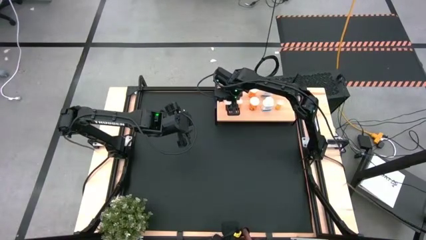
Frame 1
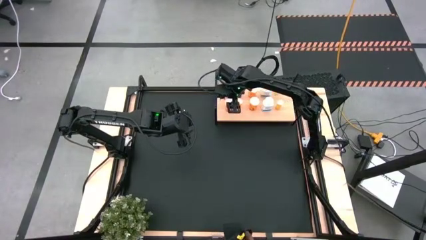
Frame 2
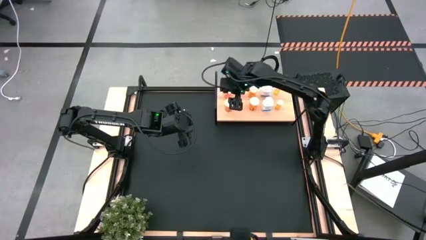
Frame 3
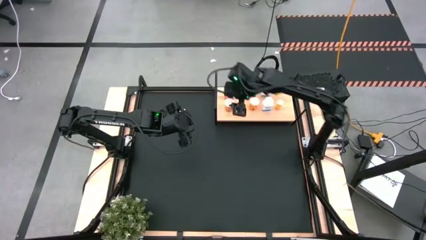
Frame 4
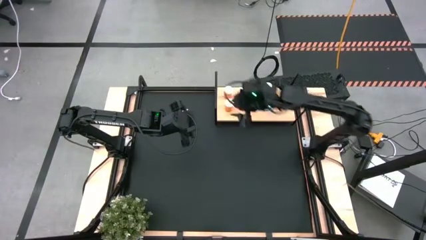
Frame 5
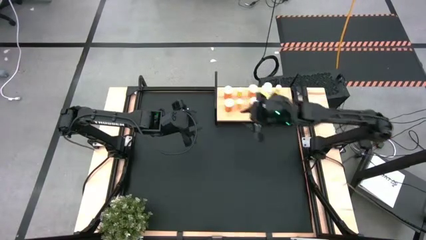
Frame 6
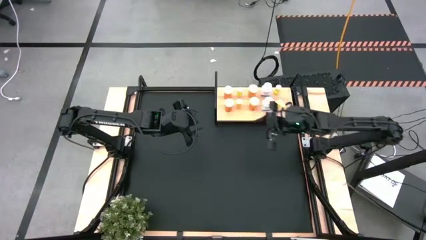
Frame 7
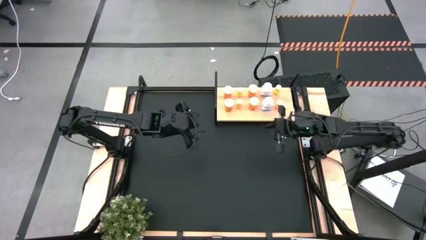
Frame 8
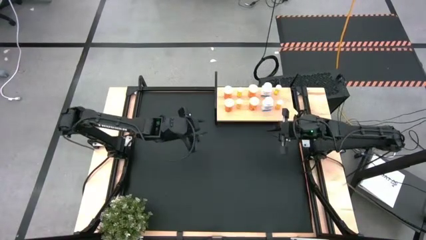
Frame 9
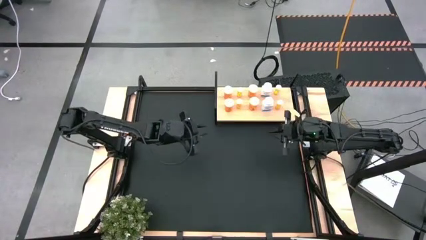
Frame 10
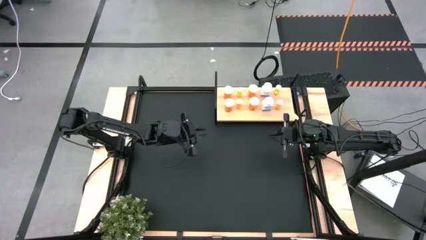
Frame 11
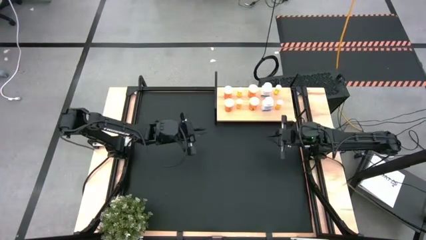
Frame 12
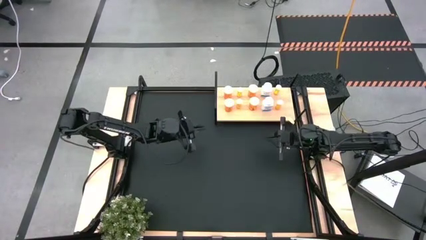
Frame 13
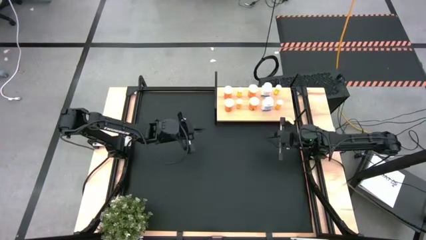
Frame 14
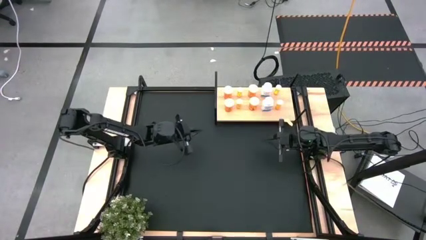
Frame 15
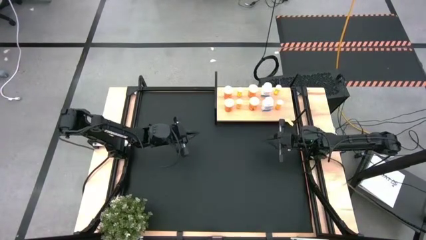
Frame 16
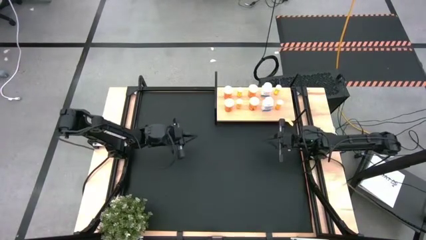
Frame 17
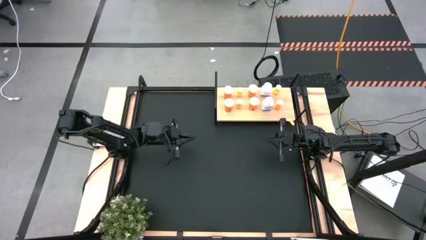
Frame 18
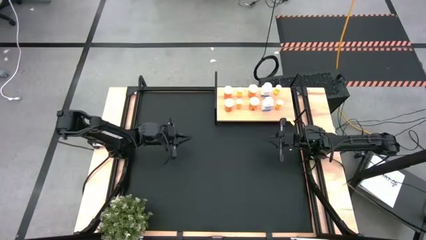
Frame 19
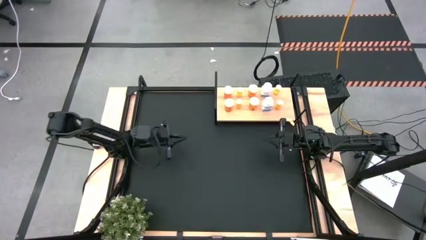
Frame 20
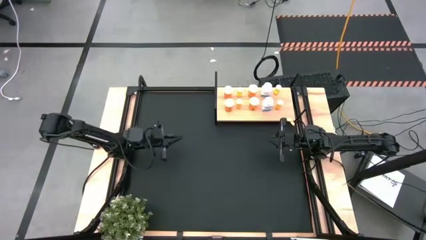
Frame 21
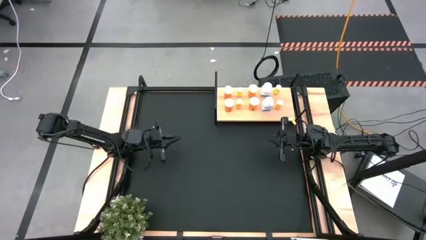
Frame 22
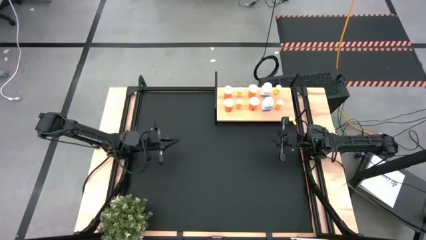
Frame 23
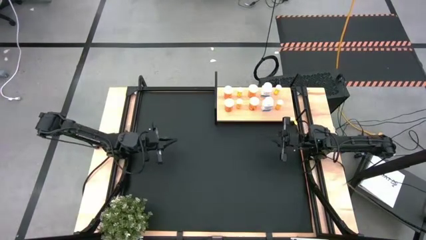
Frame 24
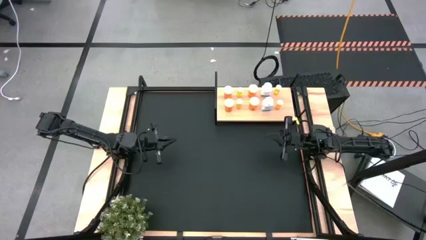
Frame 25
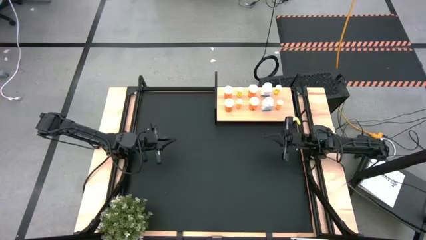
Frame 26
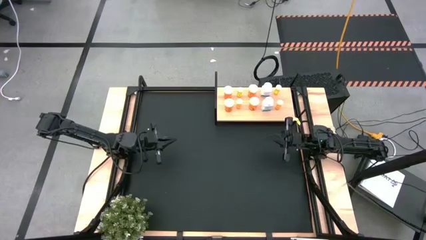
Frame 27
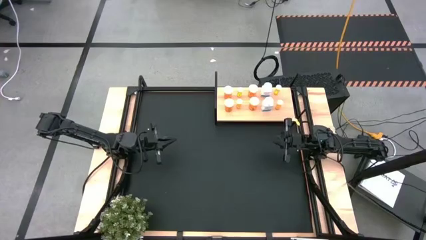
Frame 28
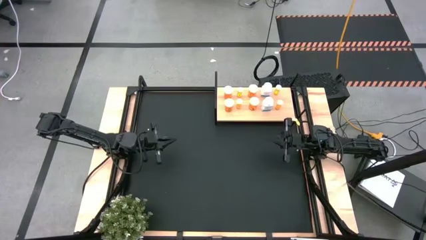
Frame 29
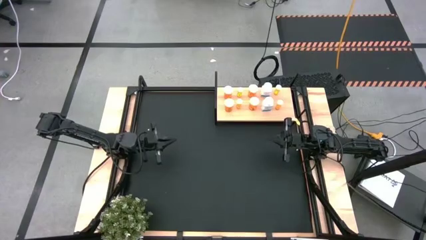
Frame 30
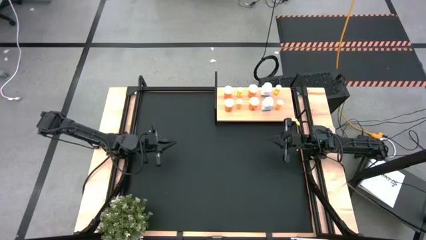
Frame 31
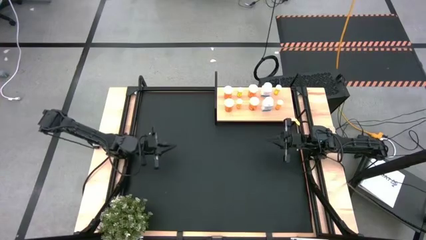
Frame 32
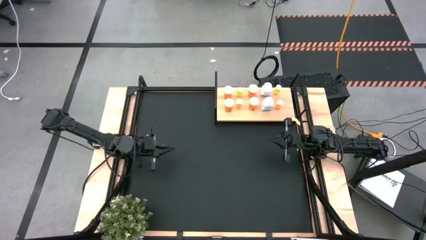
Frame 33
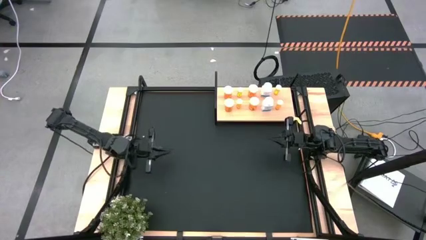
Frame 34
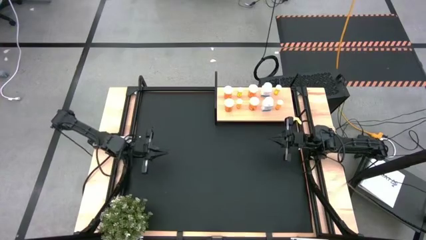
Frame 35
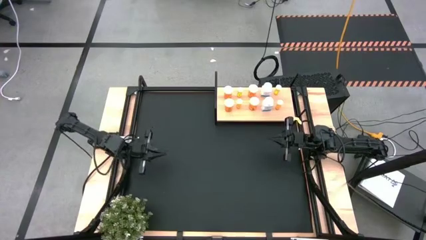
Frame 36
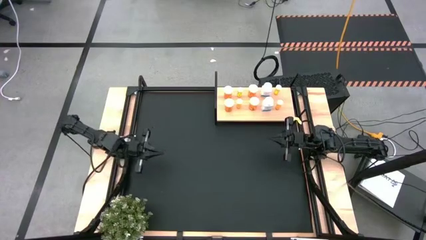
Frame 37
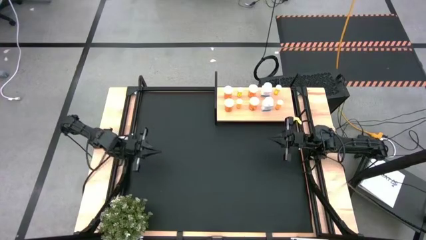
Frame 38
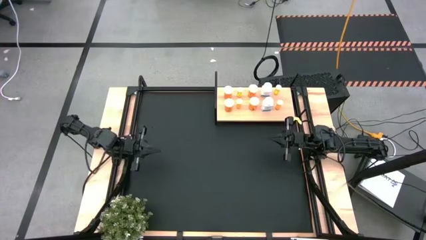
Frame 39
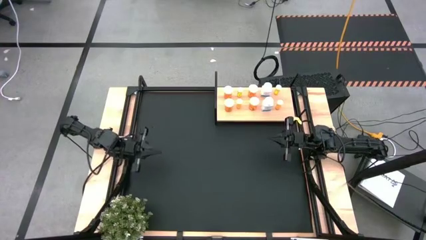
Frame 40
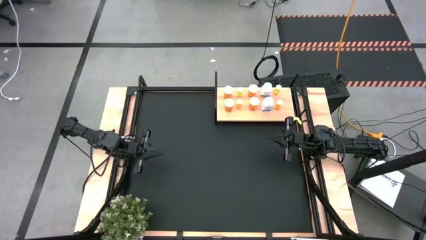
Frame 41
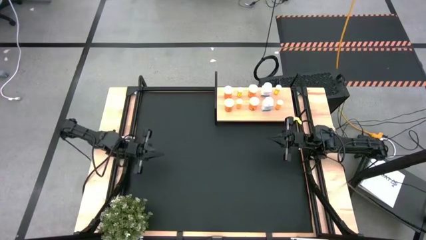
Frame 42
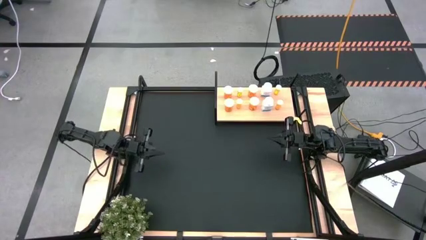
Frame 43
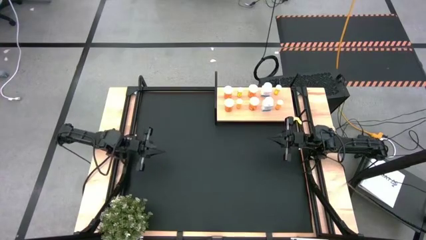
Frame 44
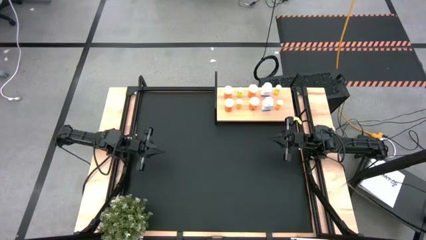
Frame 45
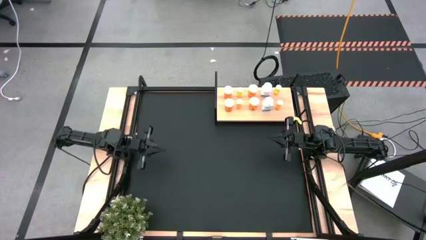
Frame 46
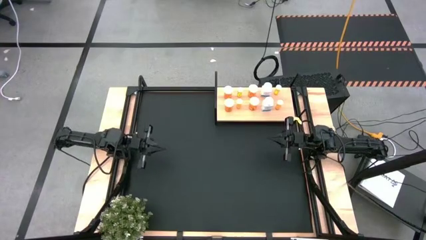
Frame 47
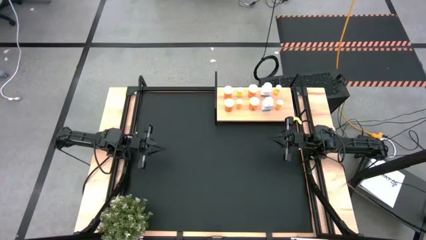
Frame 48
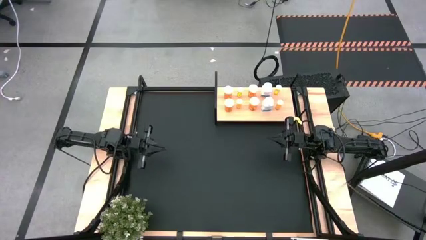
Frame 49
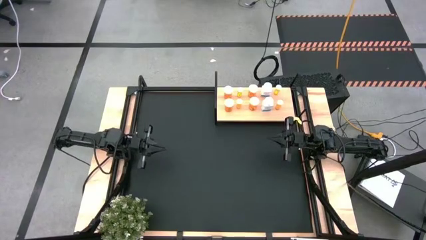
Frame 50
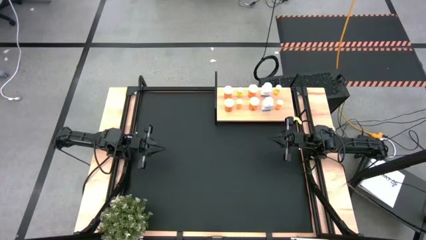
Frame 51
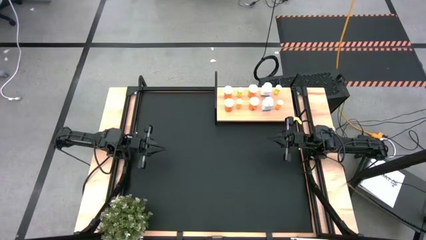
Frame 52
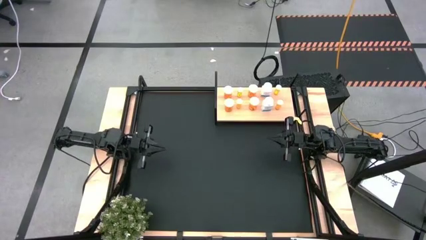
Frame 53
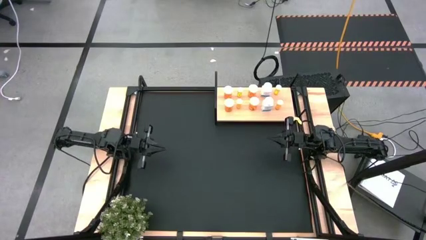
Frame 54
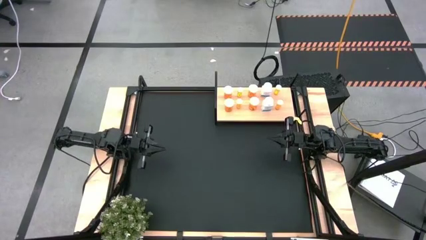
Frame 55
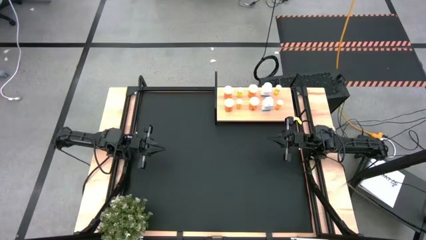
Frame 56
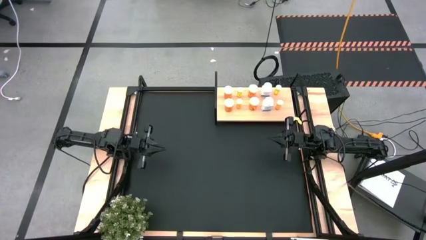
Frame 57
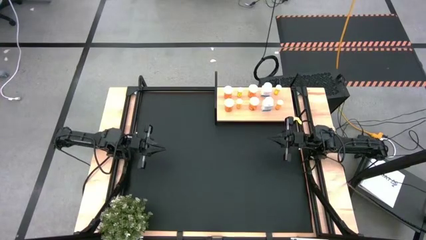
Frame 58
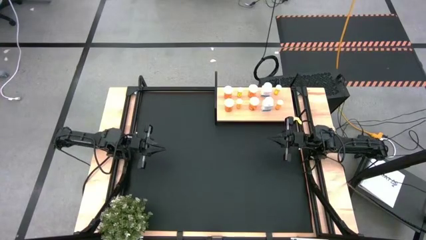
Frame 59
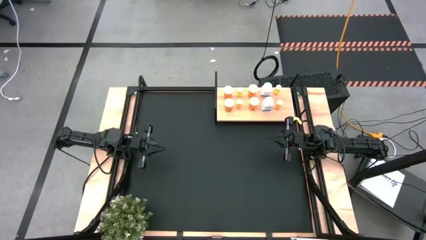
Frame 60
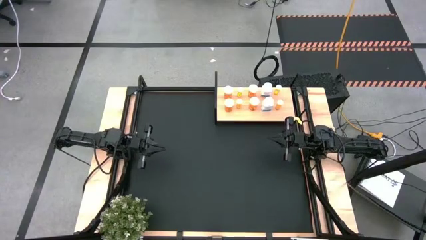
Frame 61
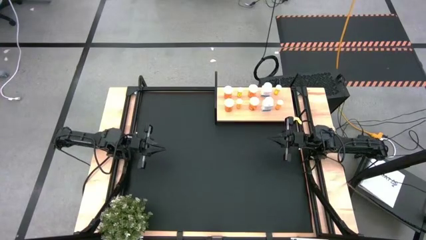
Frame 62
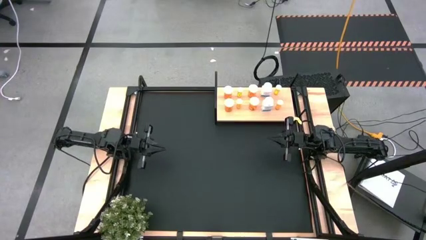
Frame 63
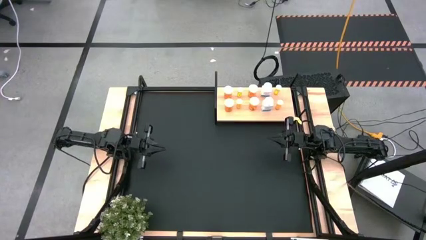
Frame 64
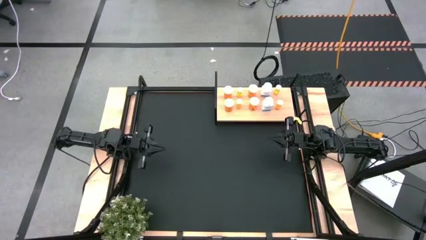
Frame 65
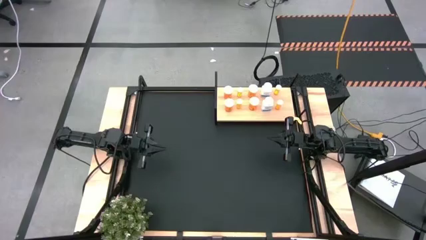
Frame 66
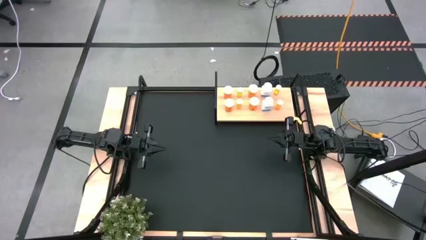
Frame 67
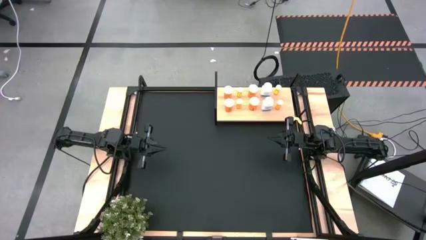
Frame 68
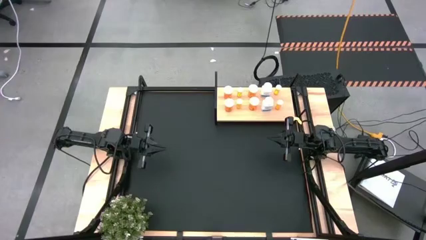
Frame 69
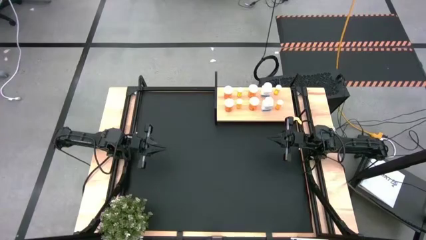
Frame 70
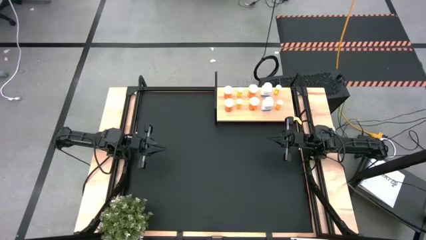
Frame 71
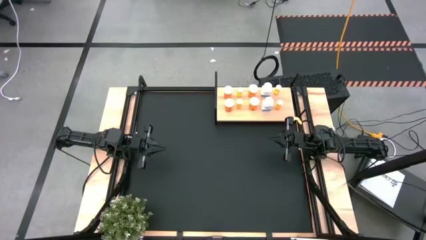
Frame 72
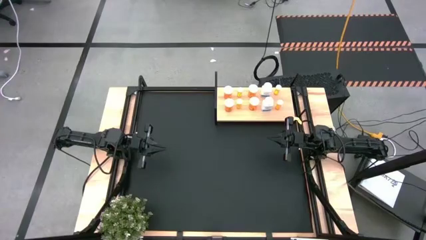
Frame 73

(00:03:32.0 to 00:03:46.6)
Task: Pick and place medicine bottles onto shelf by color
Return to Home Position

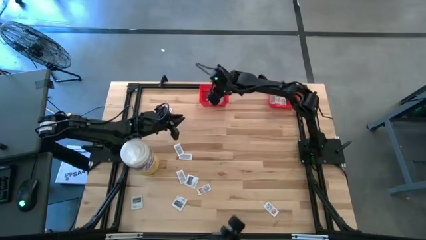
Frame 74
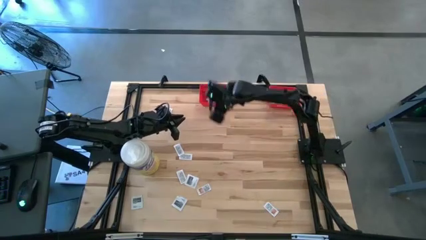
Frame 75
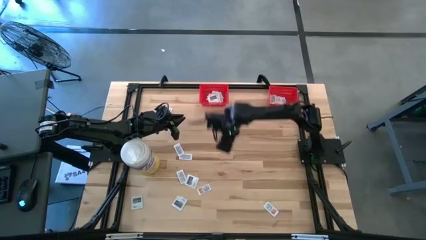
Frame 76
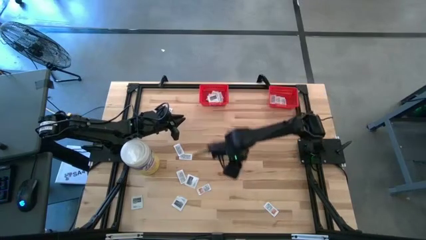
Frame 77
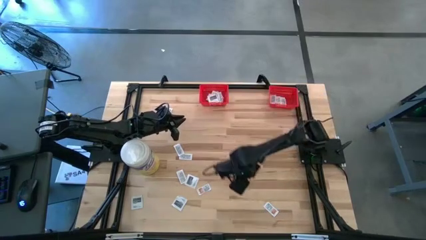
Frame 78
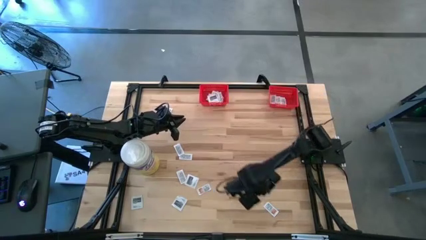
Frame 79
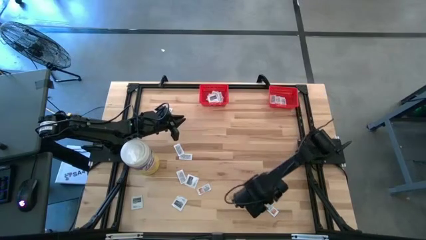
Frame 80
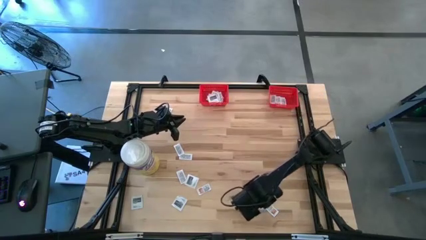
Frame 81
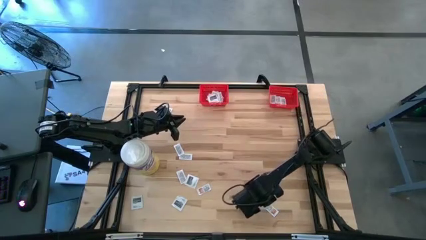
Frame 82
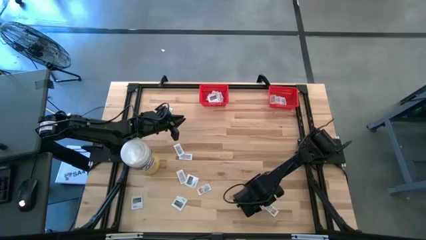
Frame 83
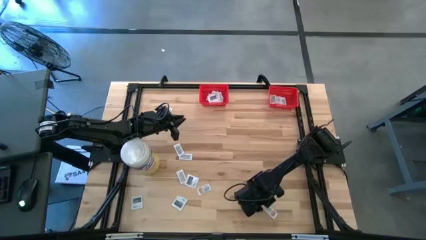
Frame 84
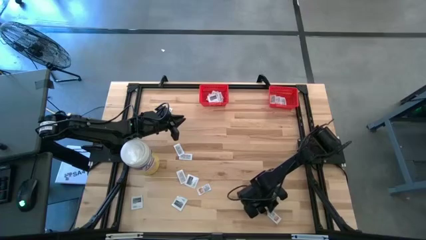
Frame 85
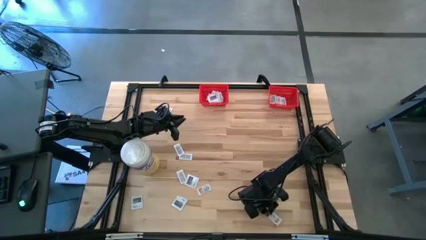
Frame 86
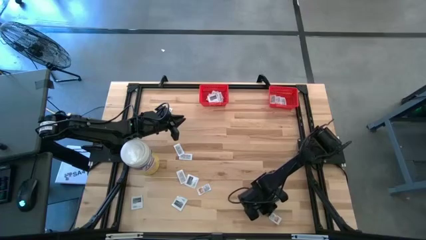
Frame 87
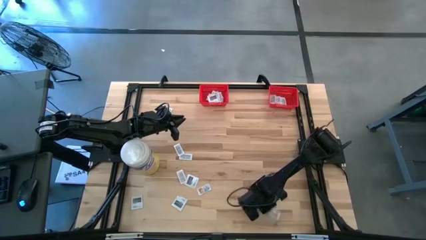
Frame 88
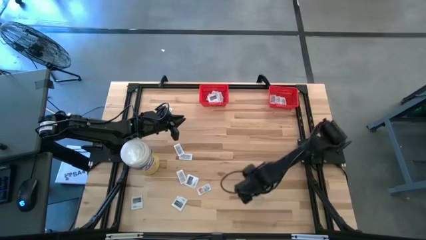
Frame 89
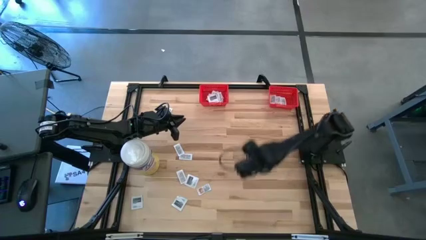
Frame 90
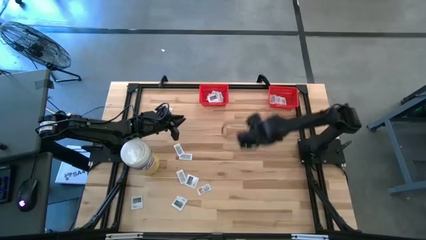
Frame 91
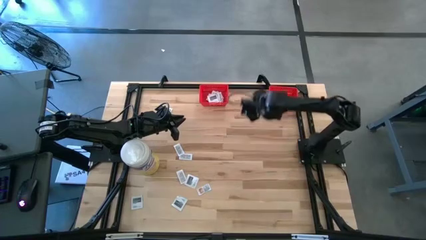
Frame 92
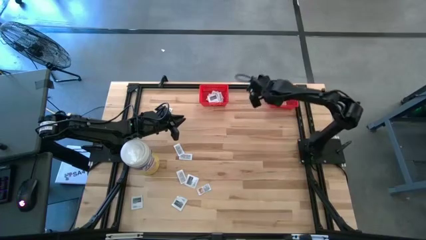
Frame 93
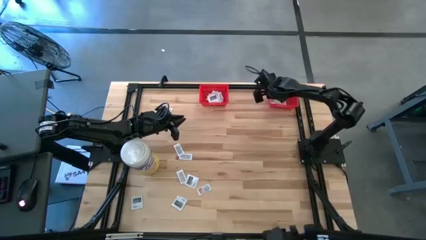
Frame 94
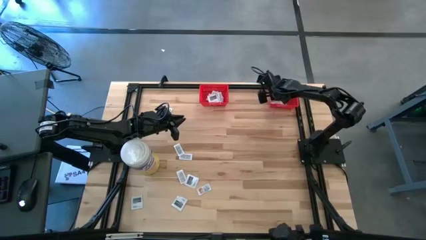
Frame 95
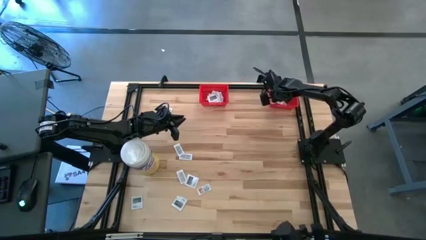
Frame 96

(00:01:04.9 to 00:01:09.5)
Task: Pick & Place First Aid Supplies
Put the ointment pack into the right red bin
